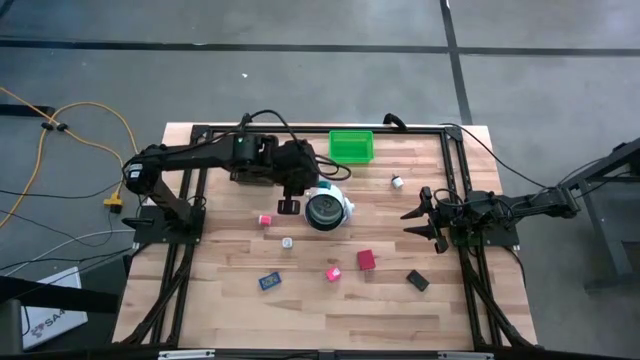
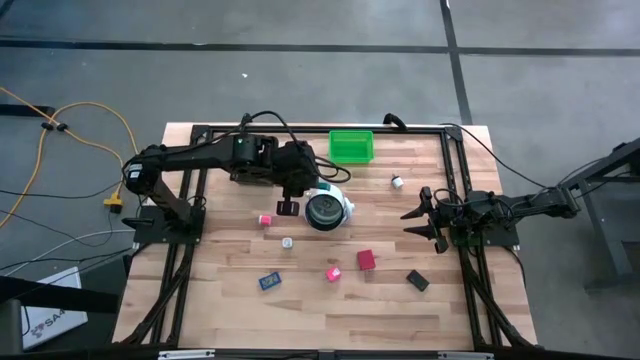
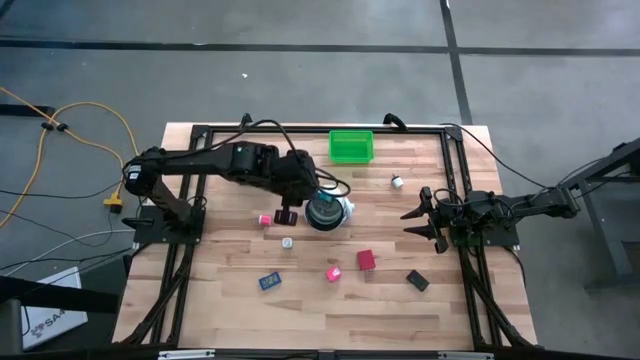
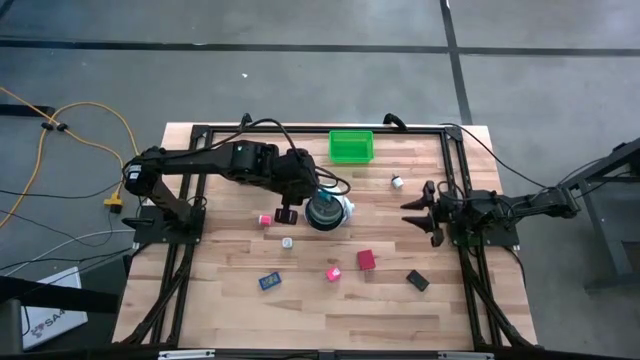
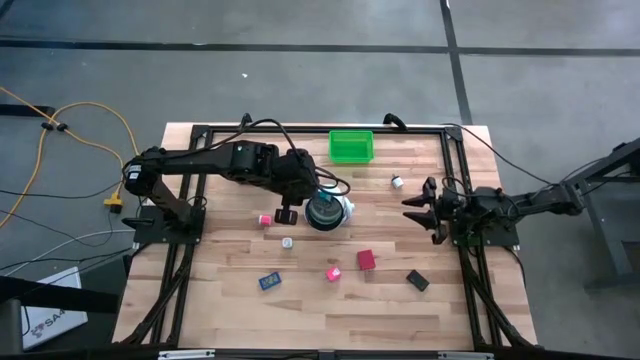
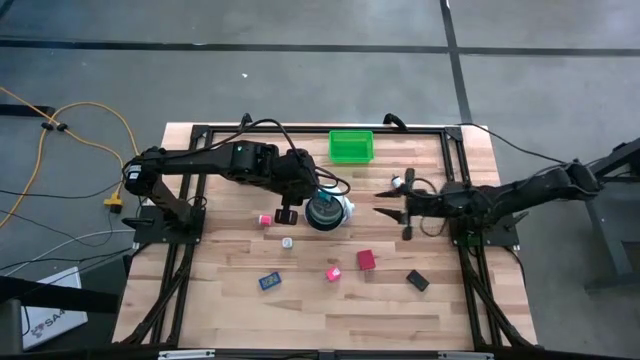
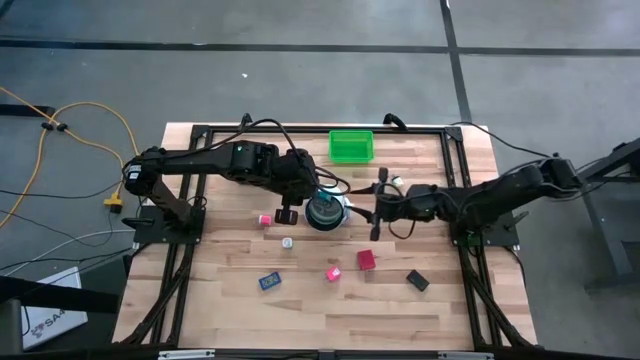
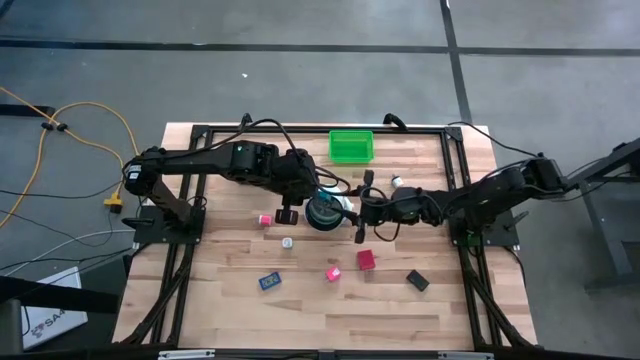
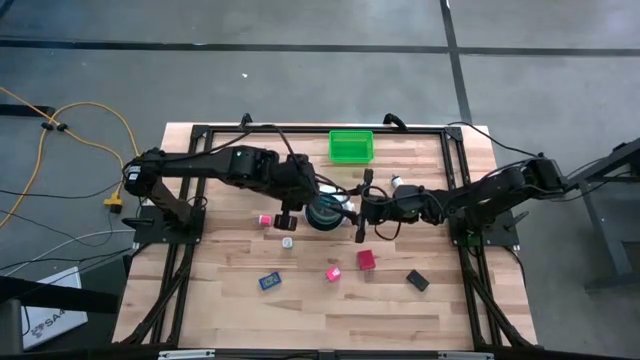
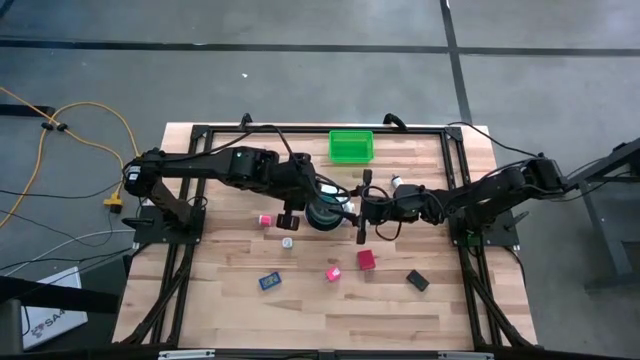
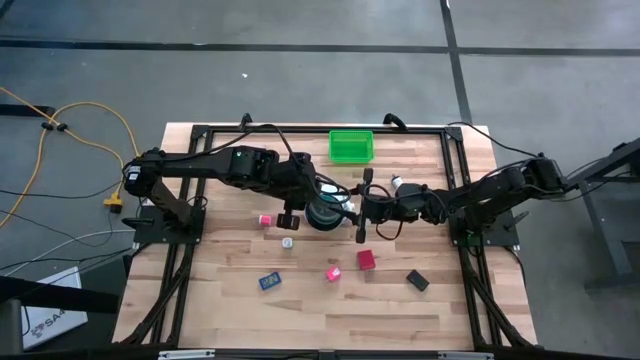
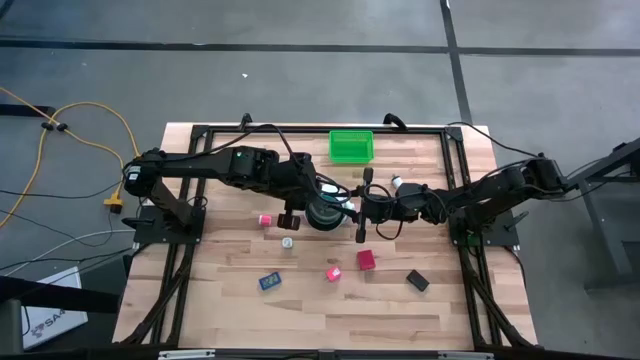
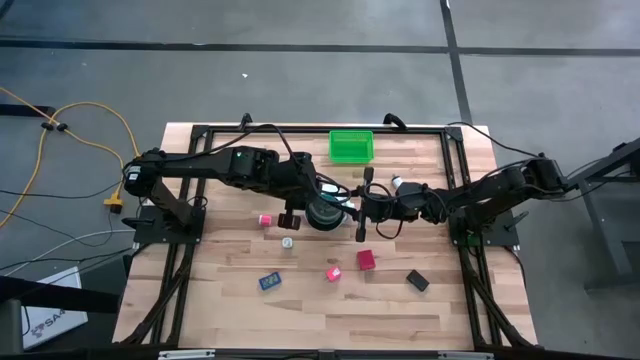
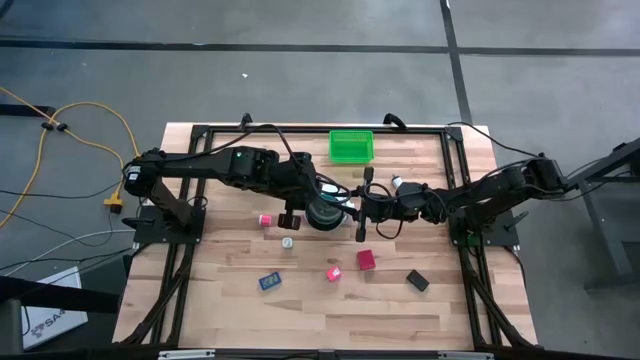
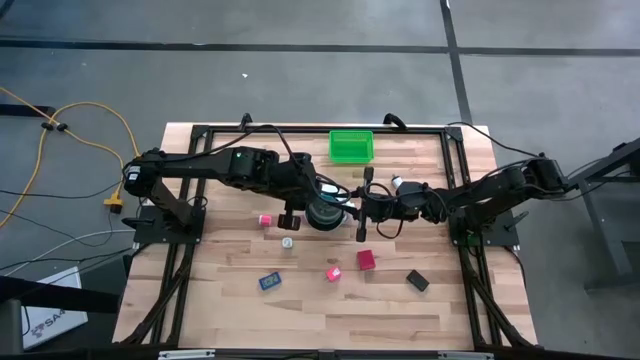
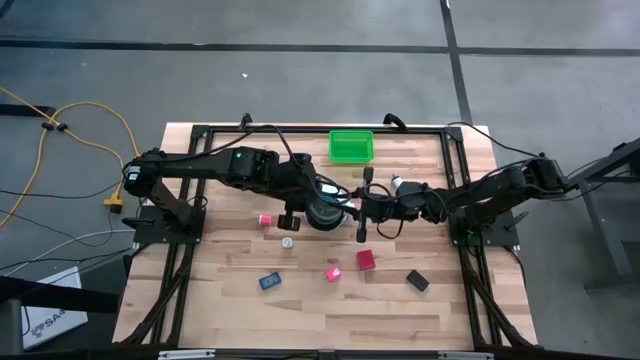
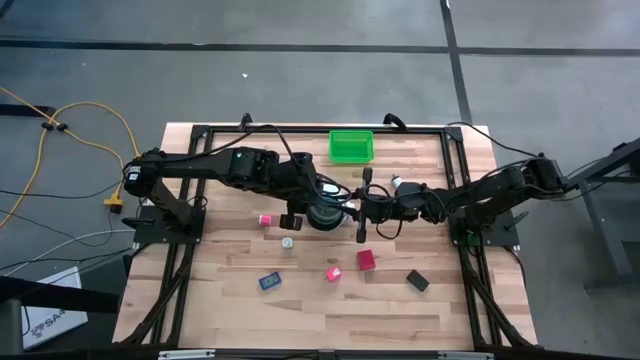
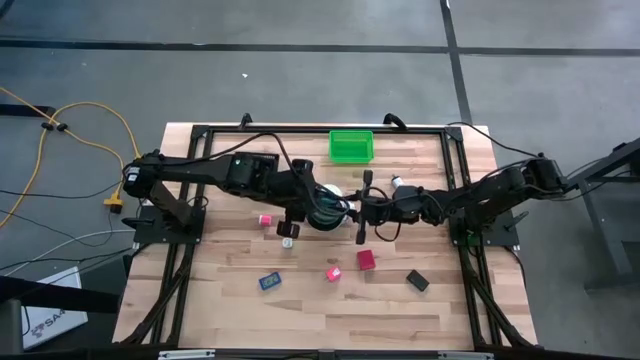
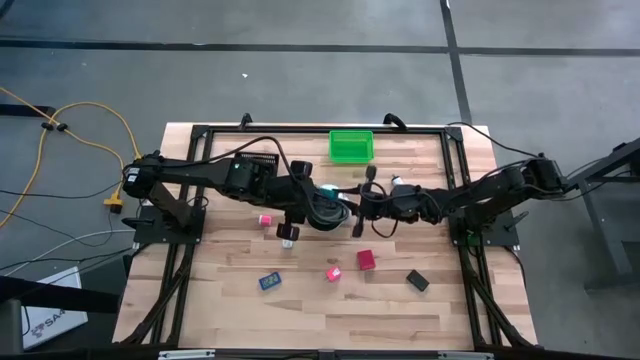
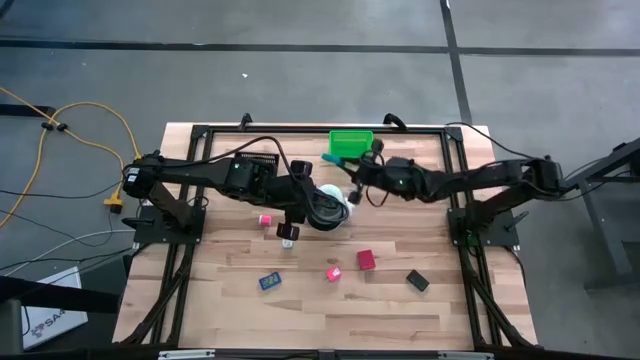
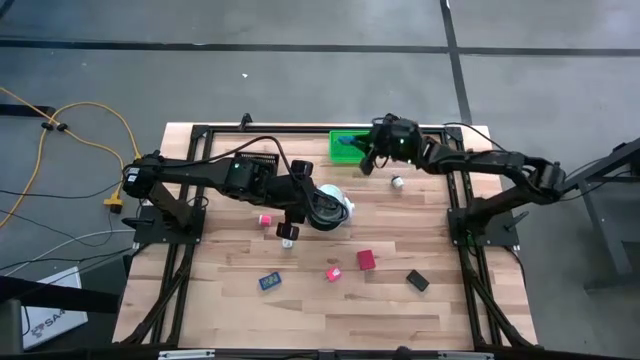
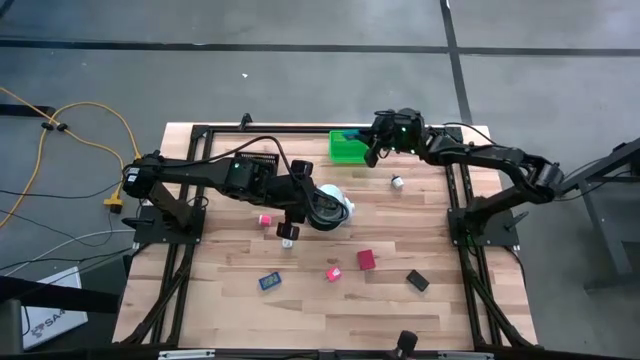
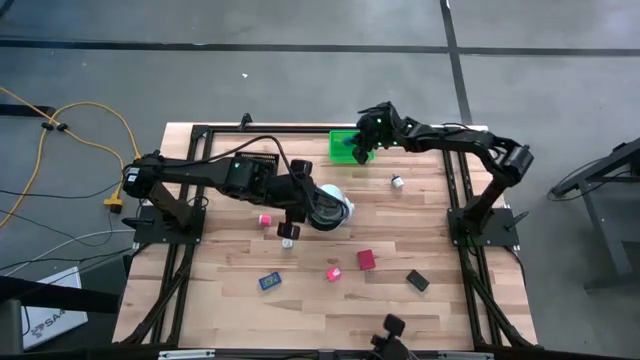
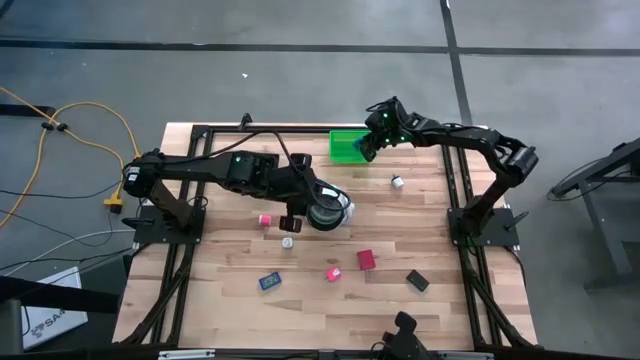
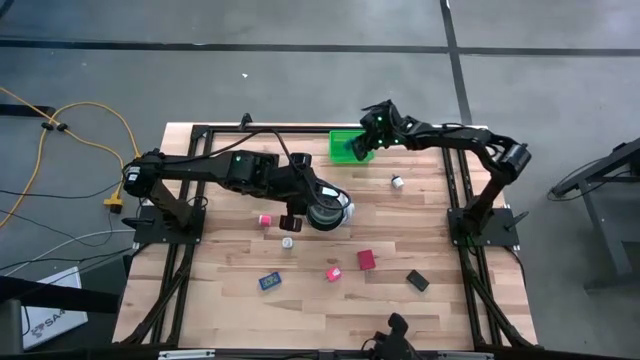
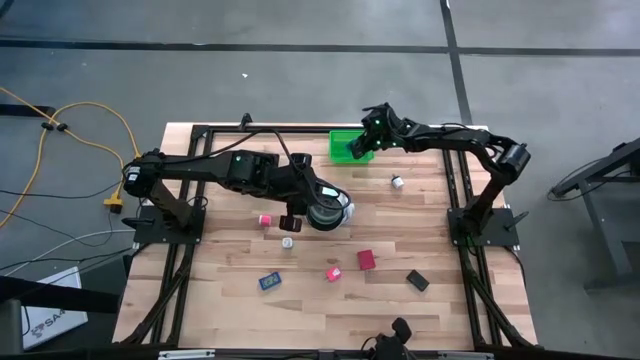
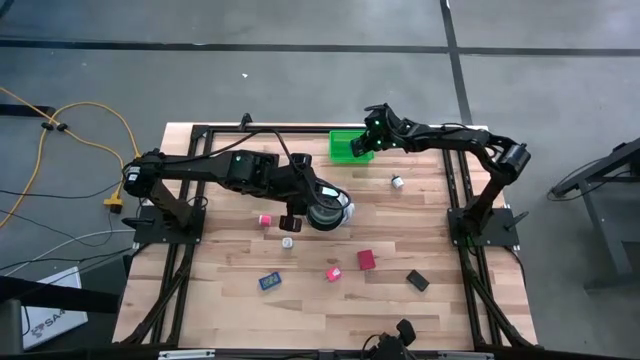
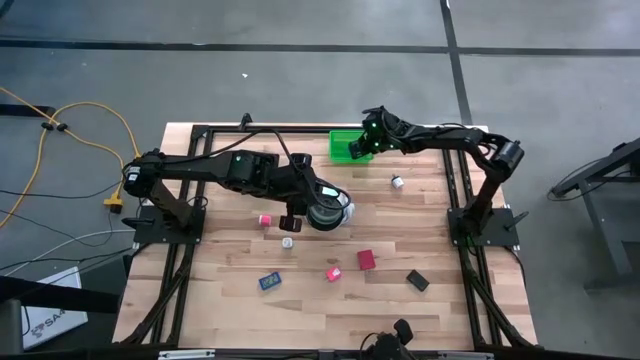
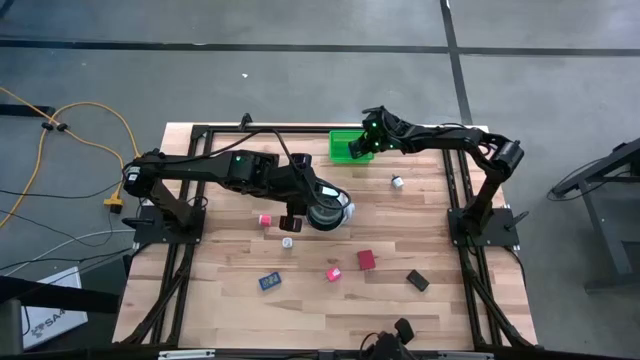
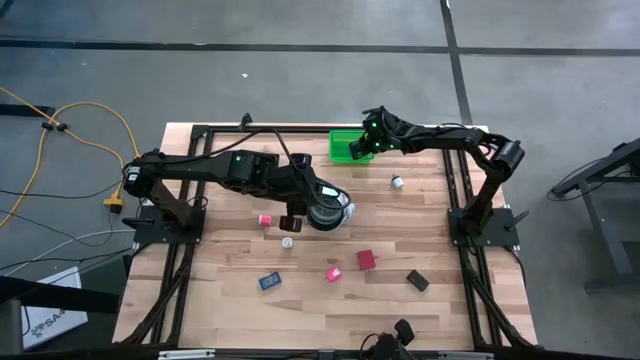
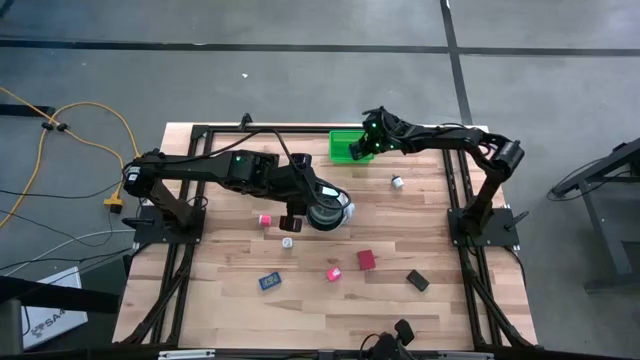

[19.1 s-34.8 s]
Task: Pick & Place Office items
Put the light blue digital timer into the green bin

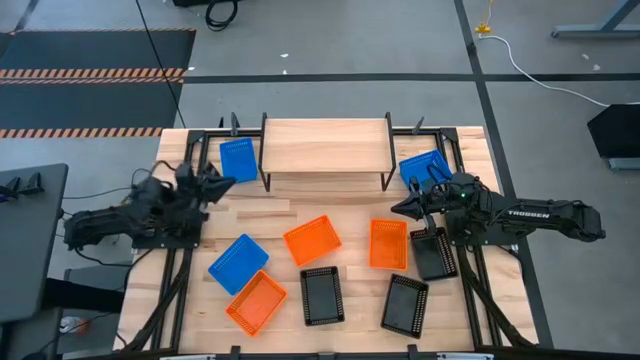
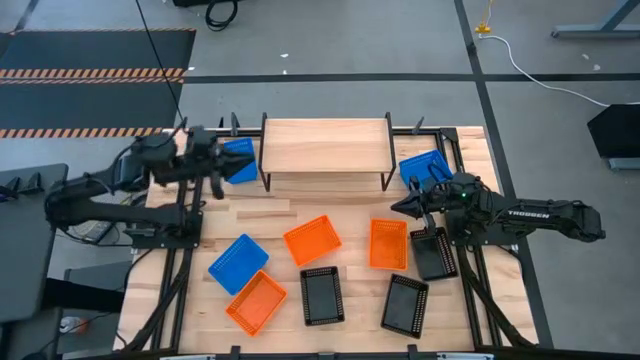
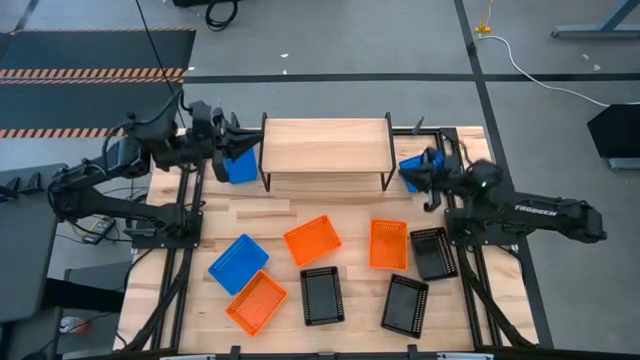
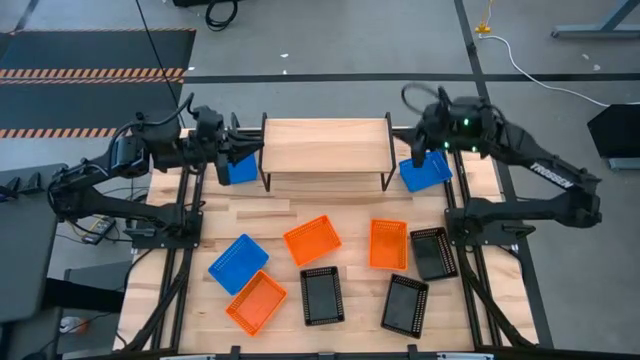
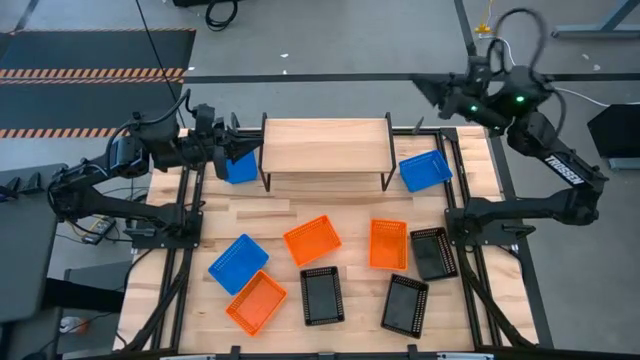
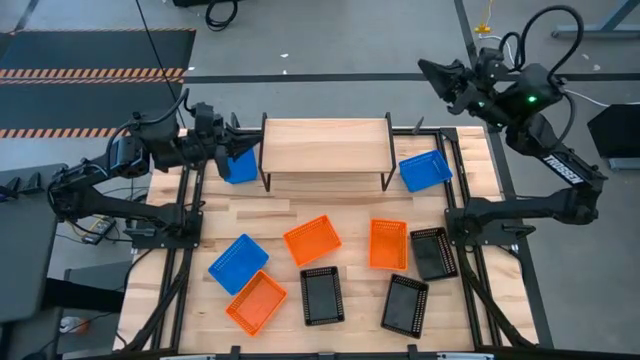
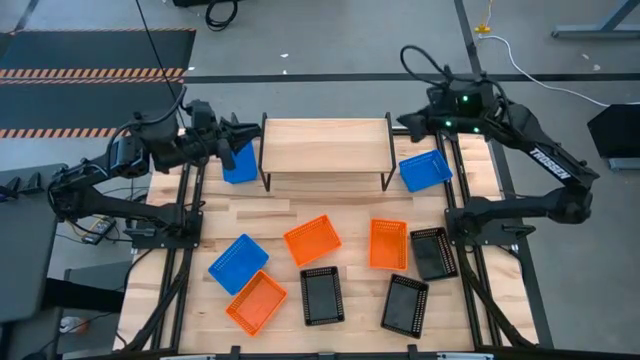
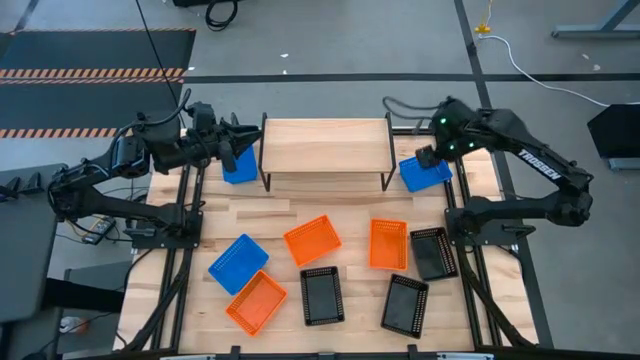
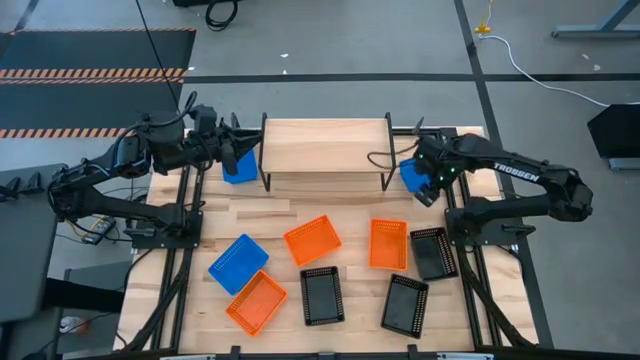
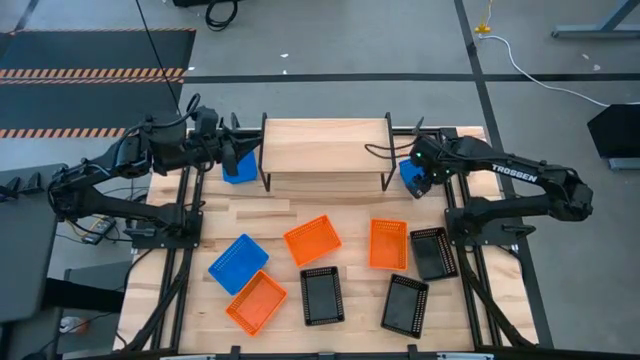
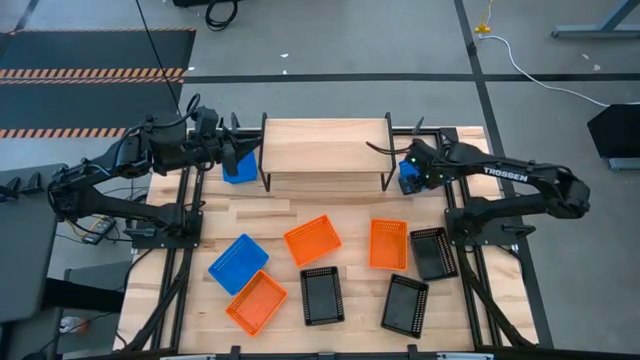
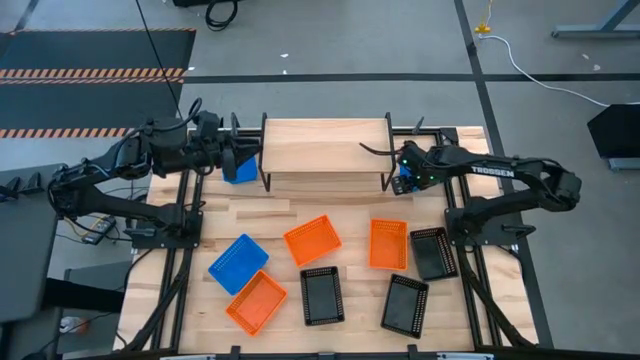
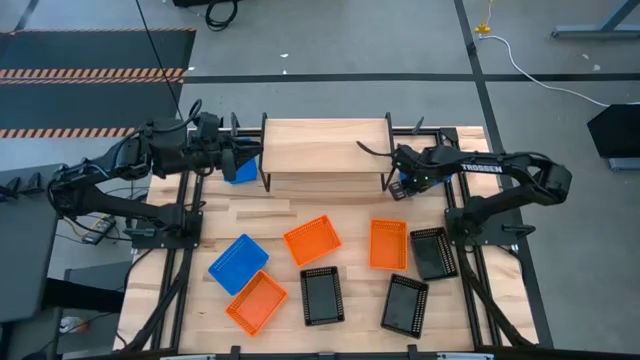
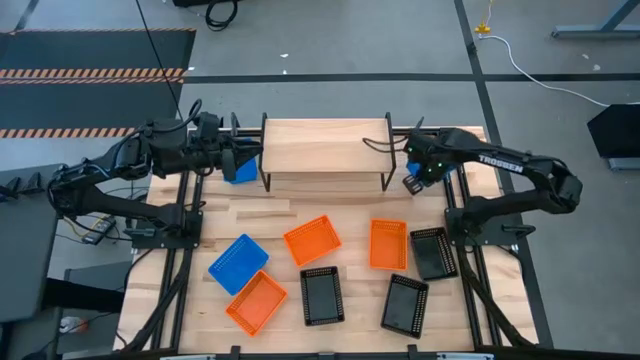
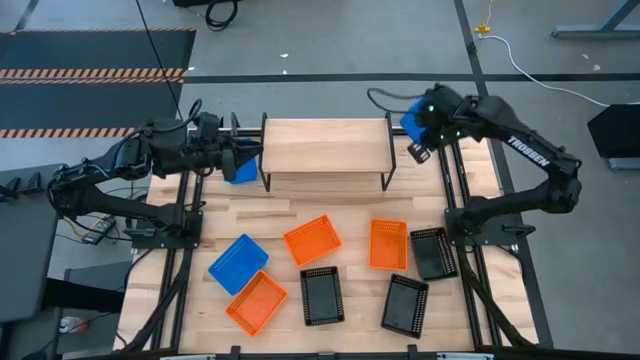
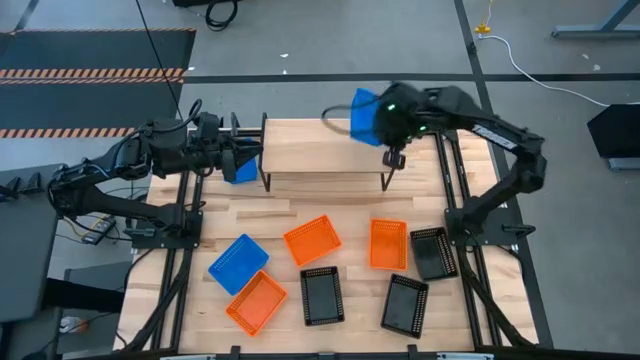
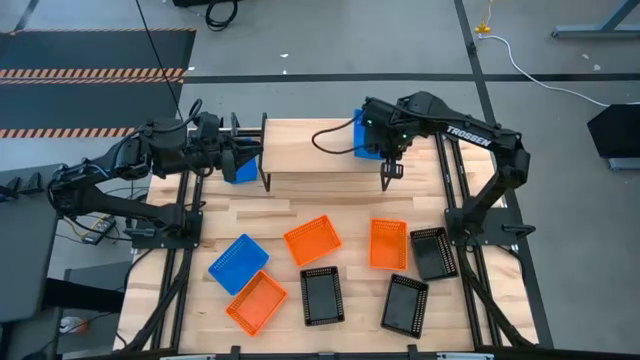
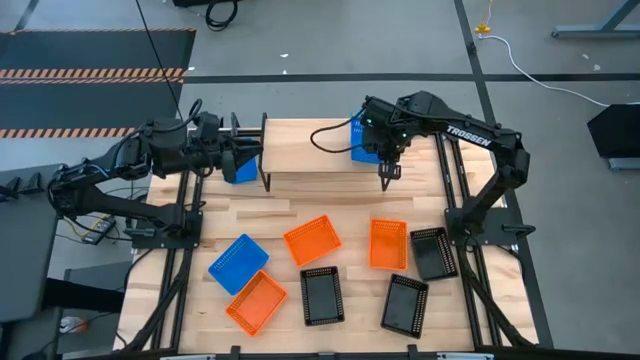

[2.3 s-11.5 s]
Task: Stack baskets on shelf by color
Put the top right blue bin on the shelf
